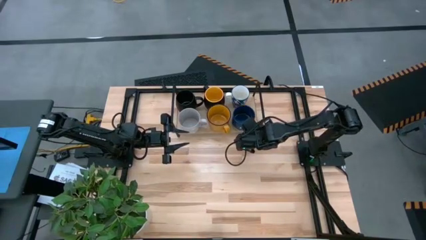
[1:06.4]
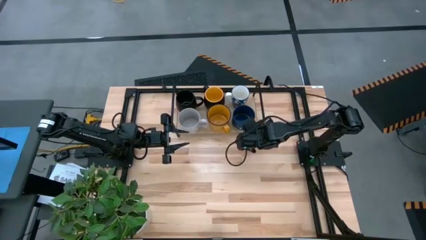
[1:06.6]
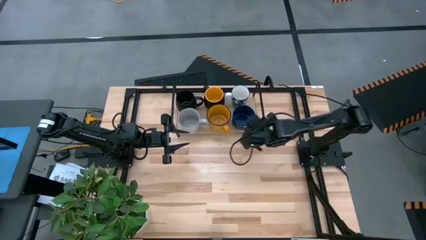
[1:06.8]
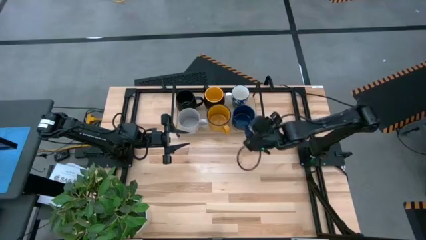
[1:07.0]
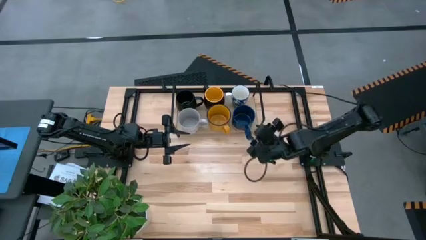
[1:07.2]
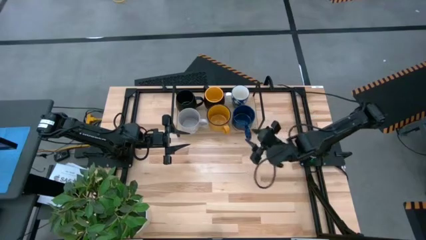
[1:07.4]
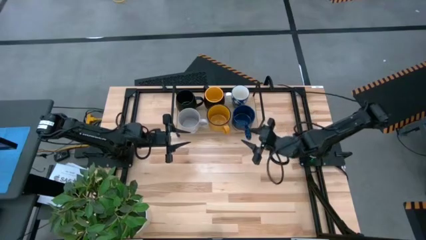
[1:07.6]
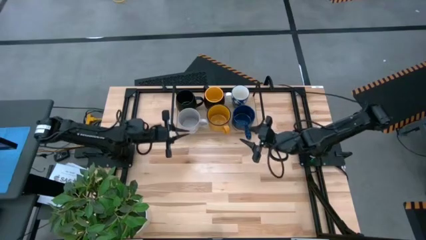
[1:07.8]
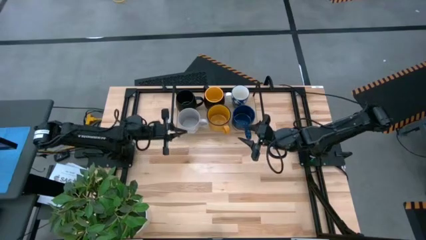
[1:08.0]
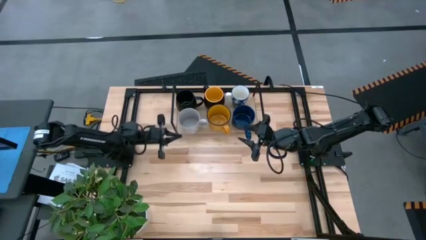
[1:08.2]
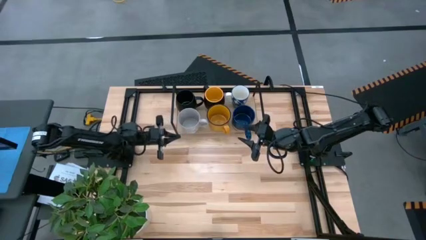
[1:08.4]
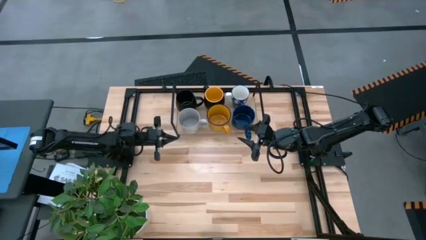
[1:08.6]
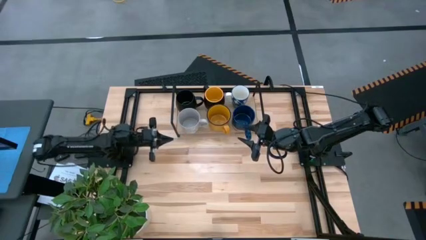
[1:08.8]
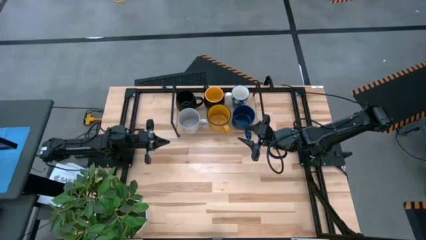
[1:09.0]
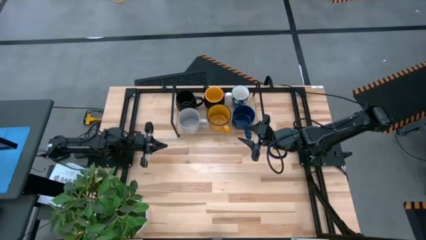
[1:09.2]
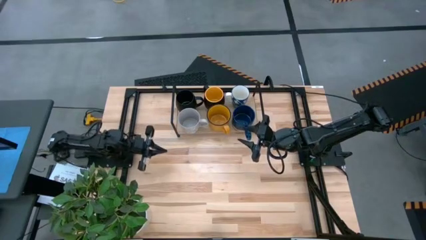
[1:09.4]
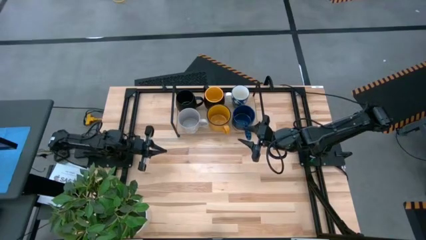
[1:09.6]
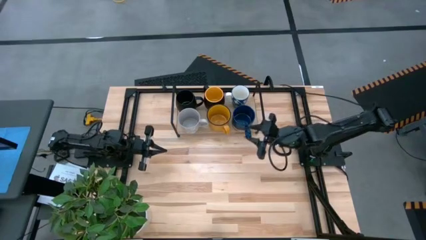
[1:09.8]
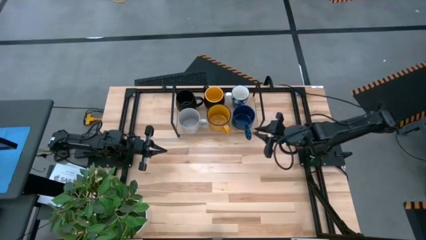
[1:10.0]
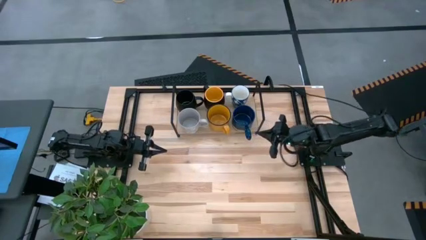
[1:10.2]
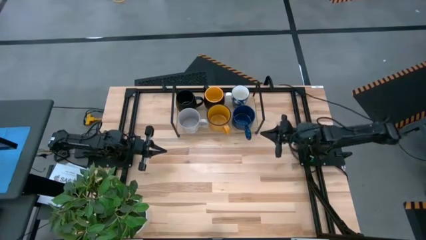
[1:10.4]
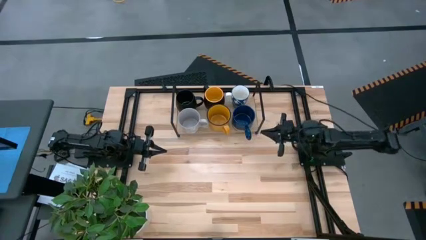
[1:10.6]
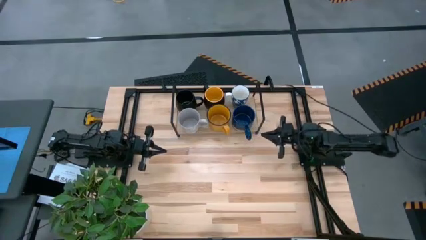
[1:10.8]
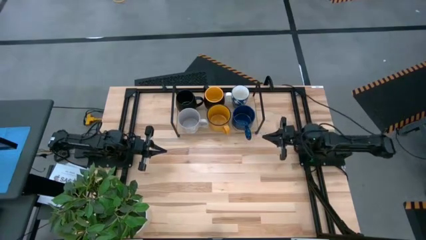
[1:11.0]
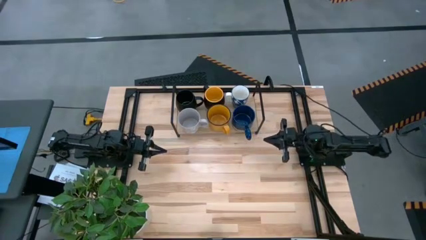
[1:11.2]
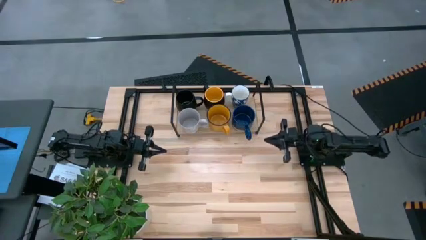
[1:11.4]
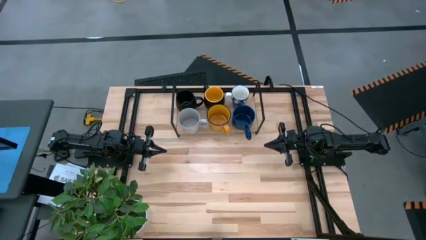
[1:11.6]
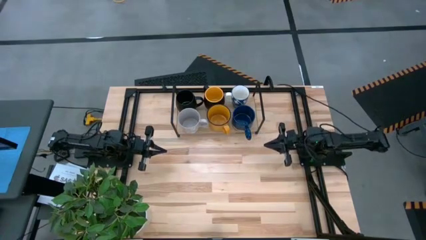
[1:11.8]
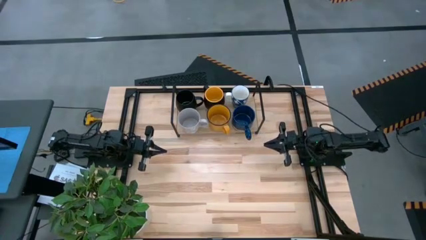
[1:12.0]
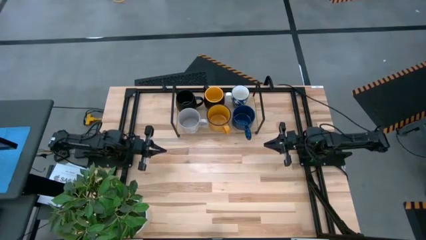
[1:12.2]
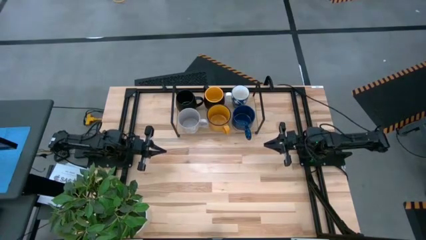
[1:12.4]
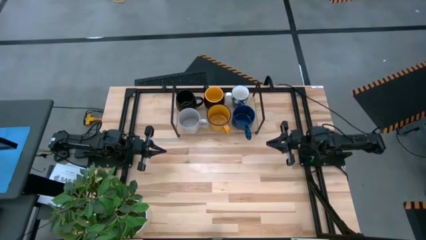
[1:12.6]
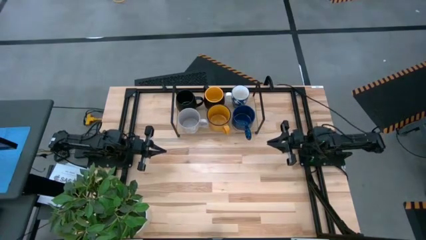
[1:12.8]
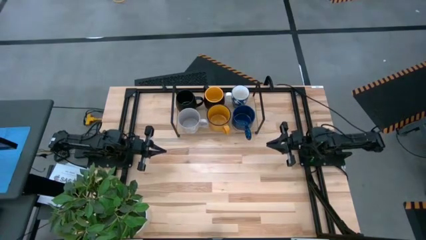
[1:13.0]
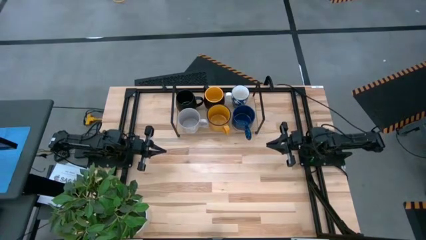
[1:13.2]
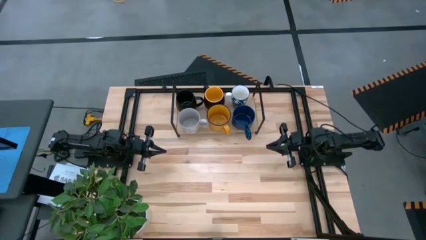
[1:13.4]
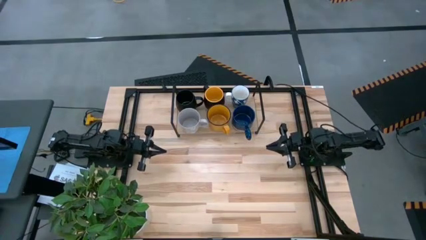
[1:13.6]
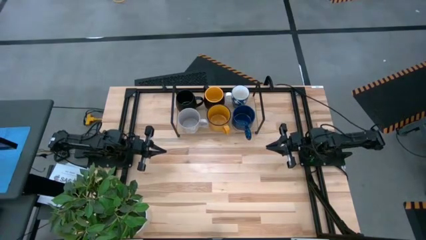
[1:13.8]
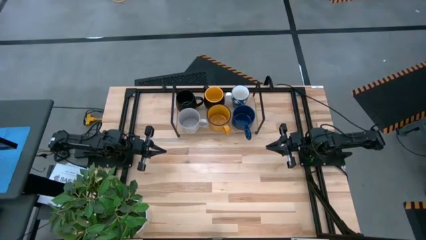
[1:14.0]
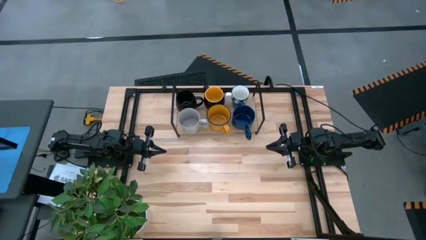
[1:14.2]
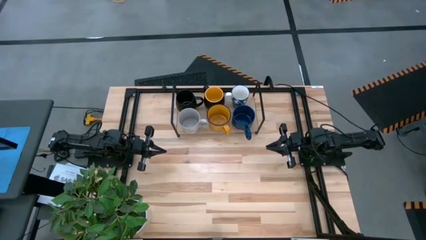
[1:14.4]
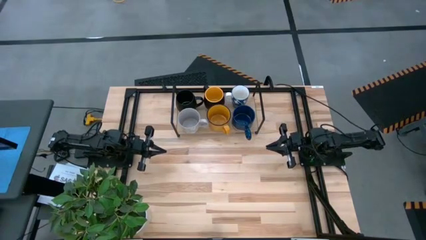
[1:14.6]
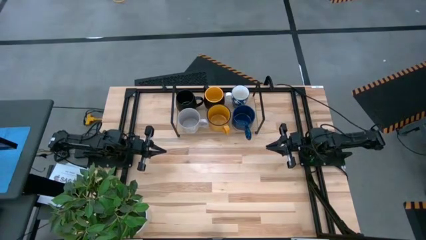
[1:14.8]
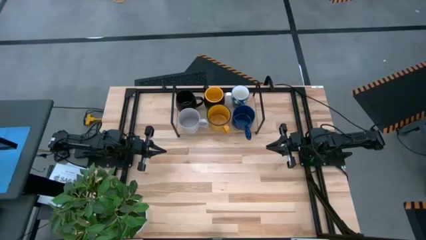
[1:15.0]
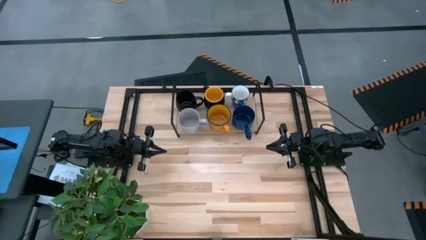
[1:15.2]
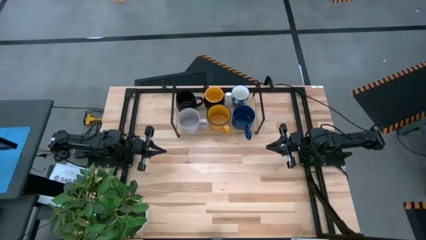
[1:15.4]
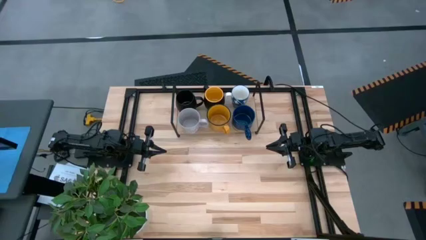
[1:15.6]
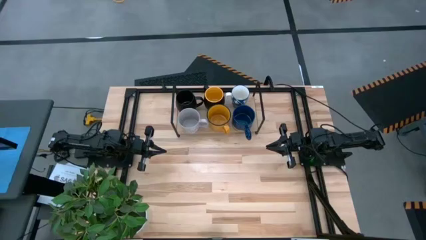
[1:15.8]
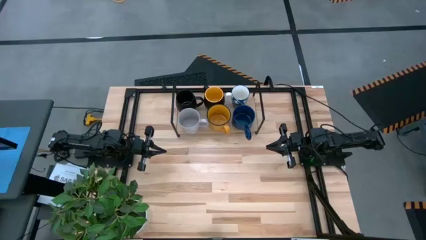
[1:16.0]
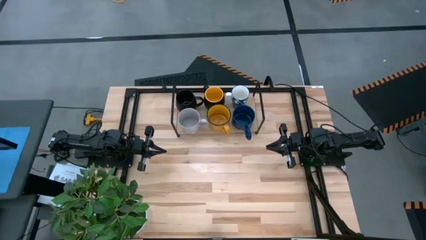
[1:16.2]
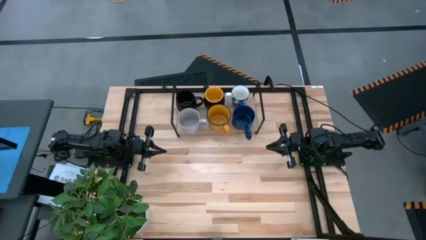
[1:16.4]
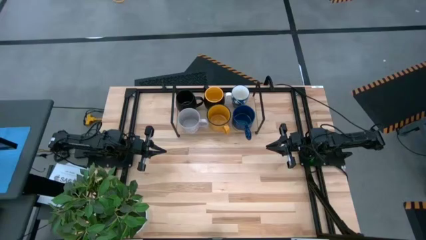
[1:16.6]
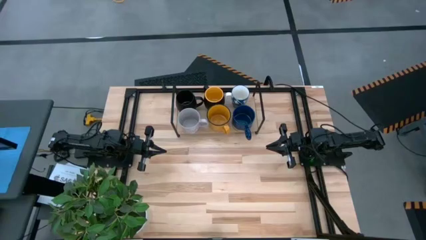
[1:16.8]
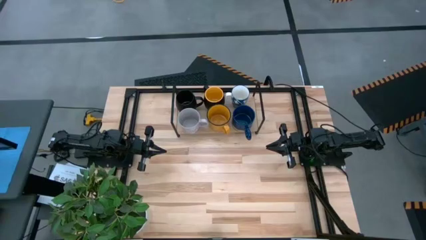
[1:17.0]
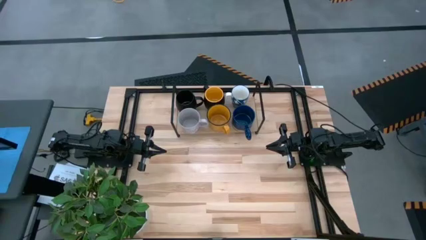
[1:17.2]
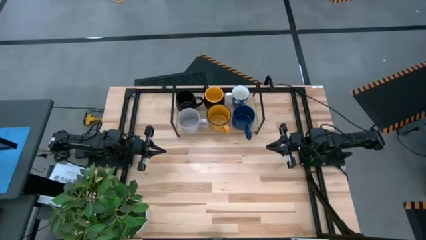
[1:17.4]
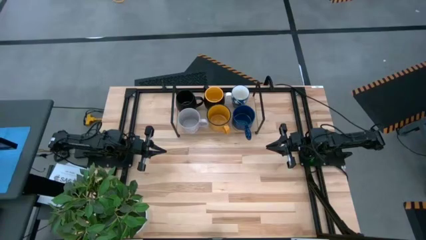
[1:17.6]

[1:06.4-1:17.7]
Task: Place coffee mugs
Return to Home Position

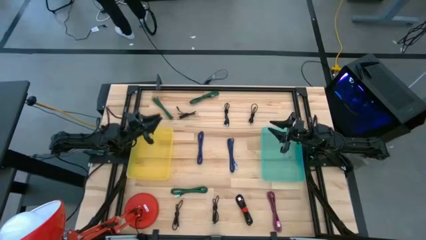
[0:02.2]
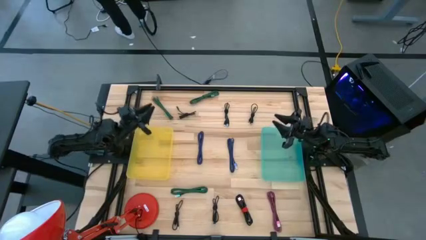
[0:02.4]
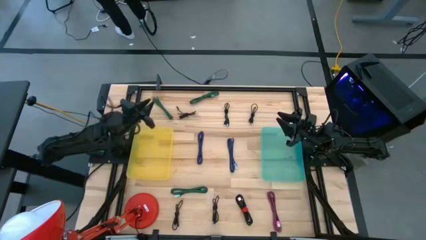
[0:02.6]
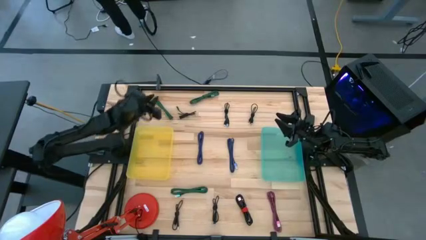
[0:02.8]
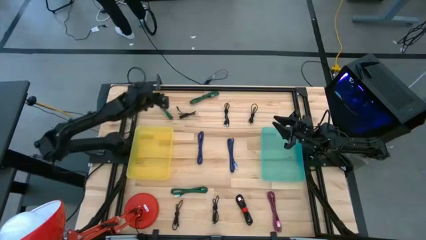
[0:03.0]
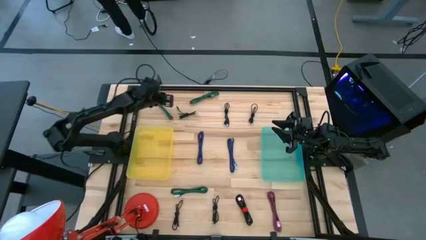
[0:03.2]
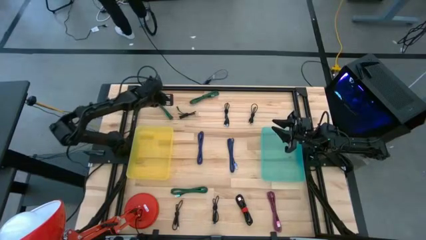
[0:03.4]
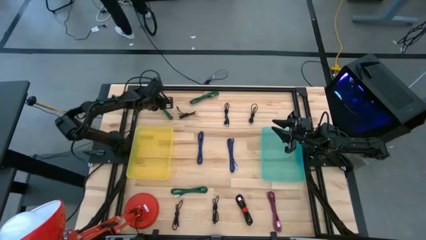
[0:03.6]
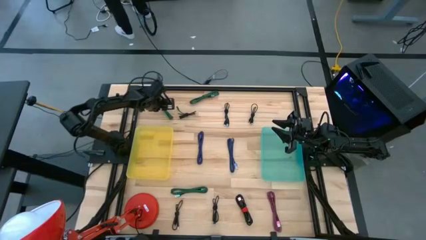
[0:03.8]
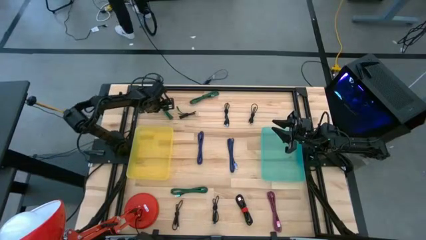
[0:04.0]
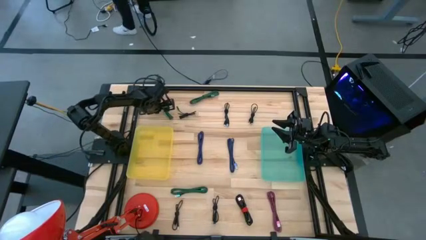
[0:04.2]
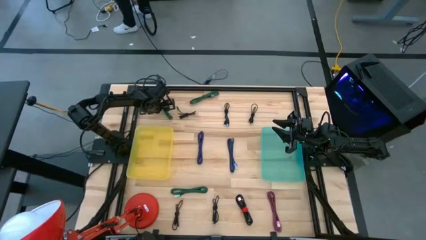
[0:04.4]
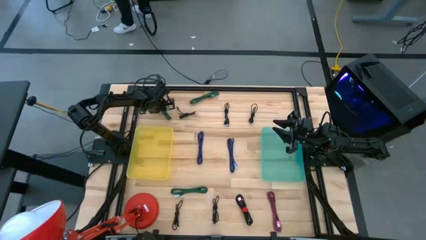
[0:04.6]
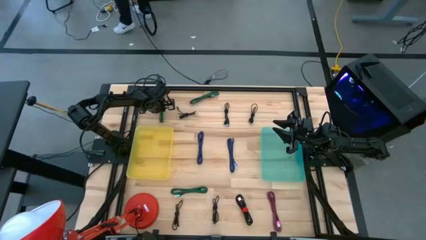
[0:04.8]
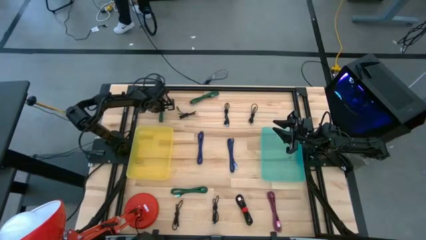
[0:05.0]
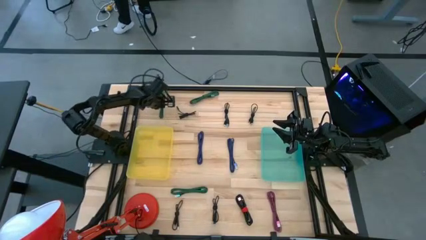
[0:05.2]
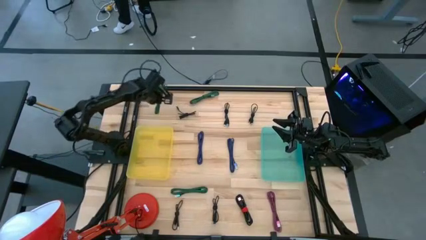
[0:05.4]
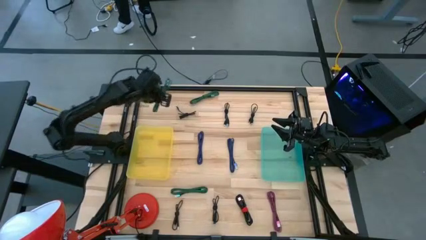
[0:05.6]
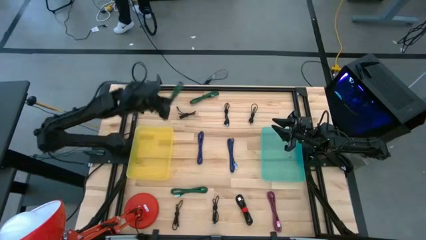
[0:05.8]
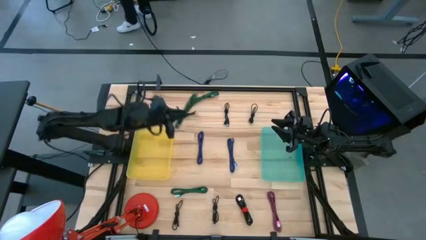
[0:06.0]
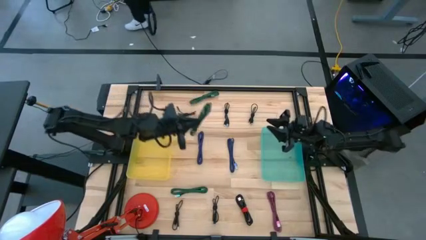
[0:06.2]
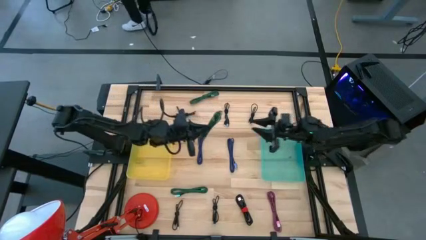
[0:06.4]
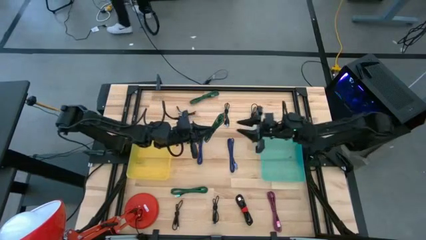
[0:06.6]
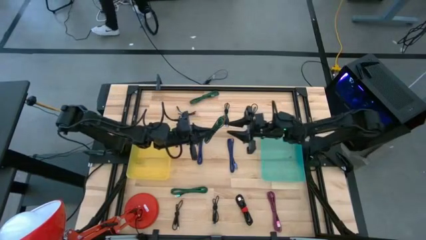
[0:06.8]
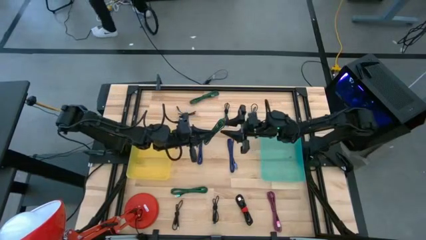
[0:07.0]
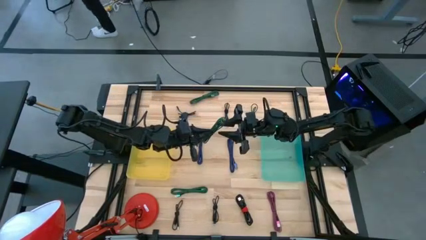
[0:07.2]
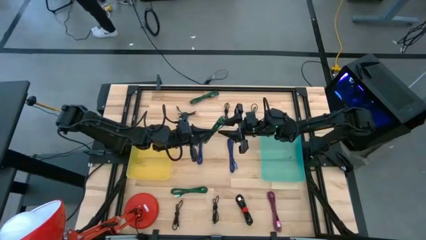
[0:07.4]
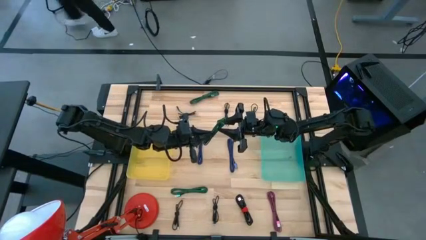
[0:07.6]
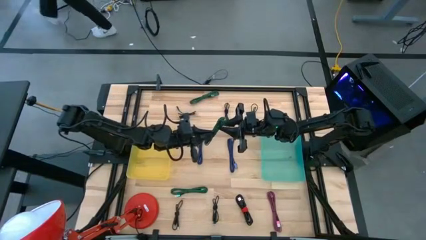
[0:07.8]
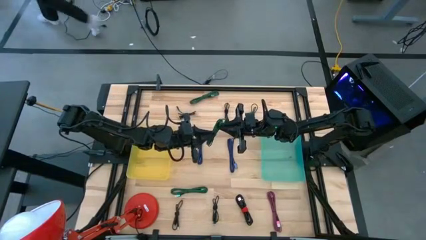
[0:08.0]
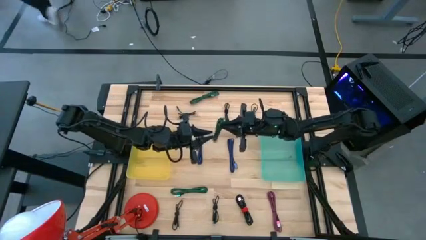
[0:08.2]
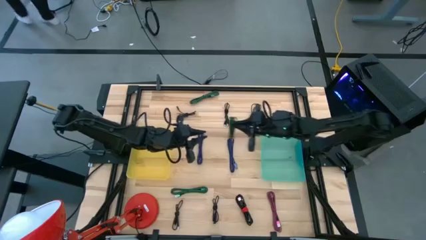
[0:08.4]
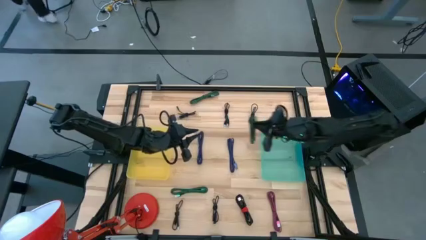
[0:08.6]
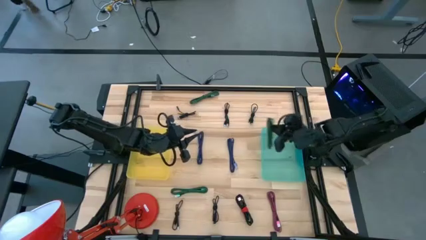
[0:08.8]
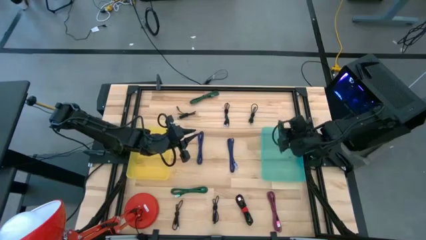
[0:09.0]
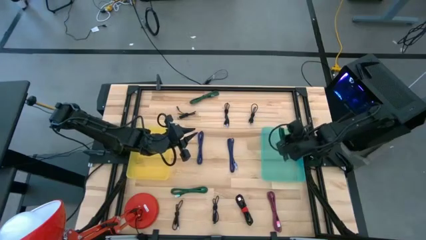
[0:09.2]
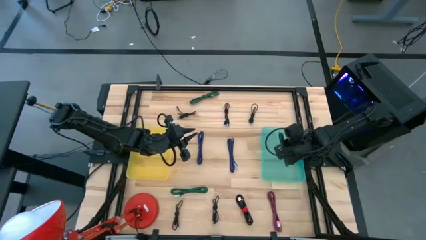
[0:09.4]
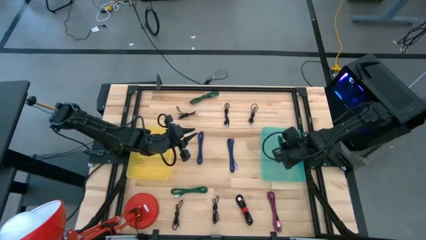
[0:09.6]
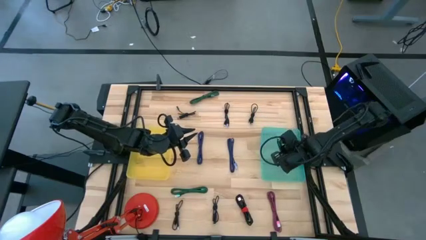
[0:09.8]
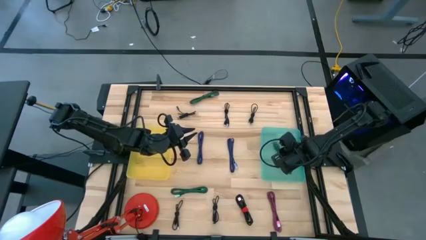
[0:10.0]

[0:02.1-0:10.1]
Task: Pick & Place USB Port
Put the top left green and black charger cable into the light green bin
